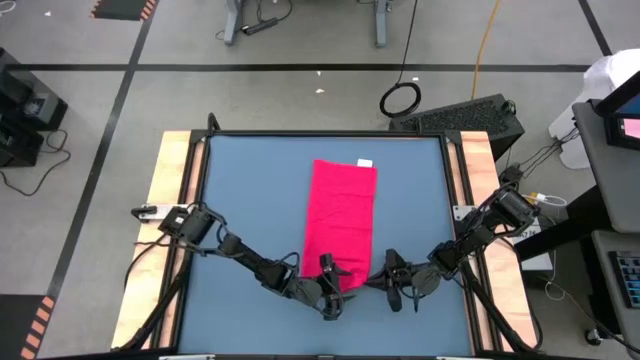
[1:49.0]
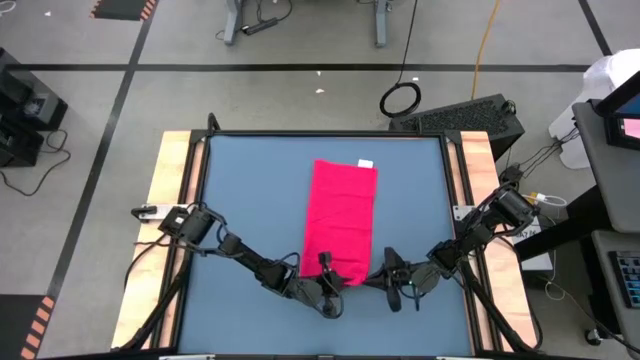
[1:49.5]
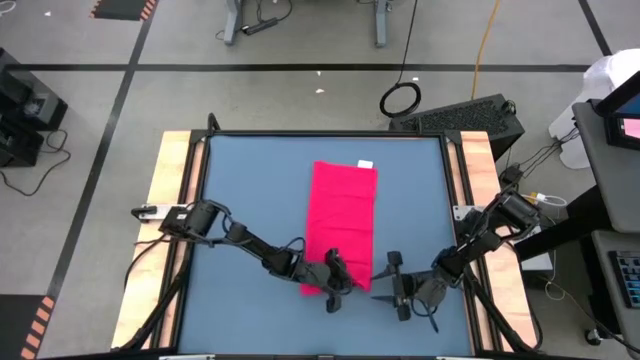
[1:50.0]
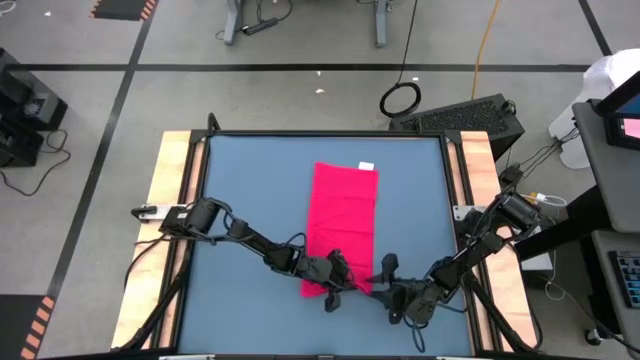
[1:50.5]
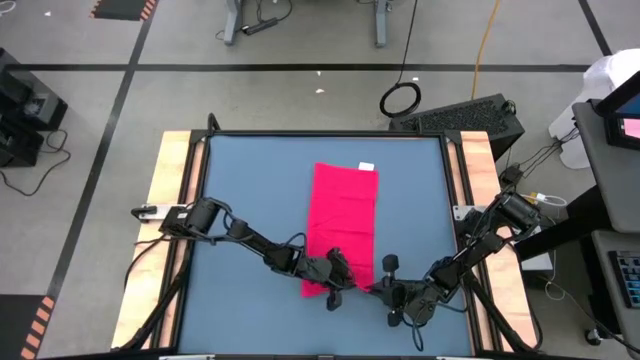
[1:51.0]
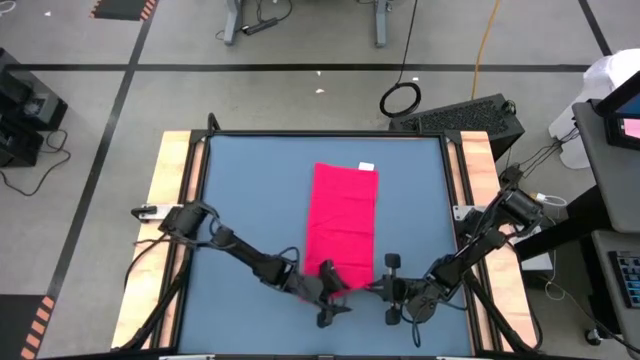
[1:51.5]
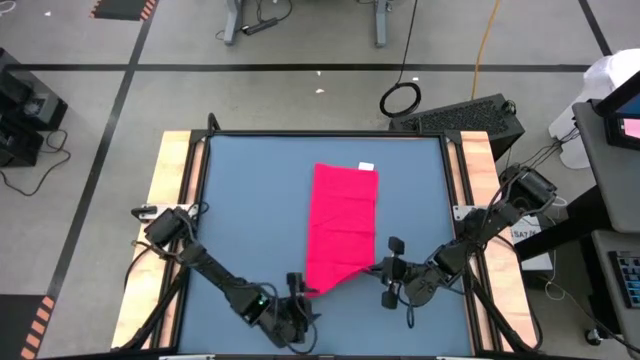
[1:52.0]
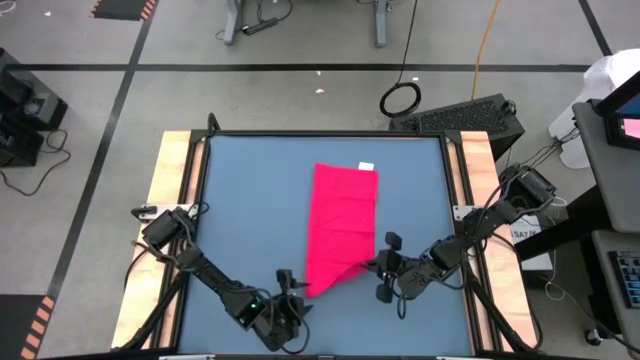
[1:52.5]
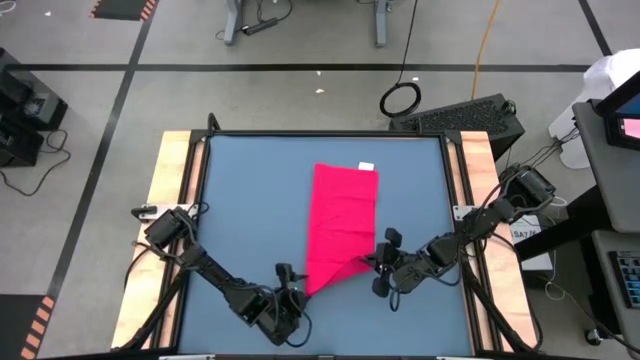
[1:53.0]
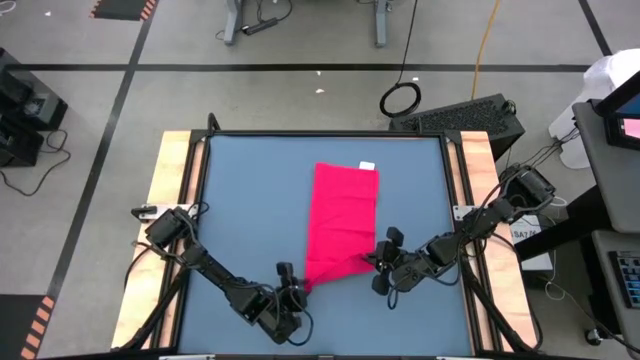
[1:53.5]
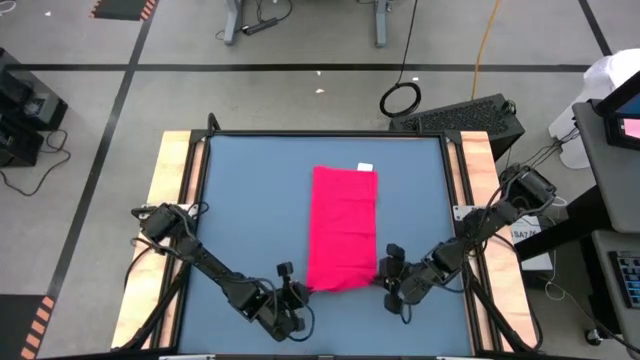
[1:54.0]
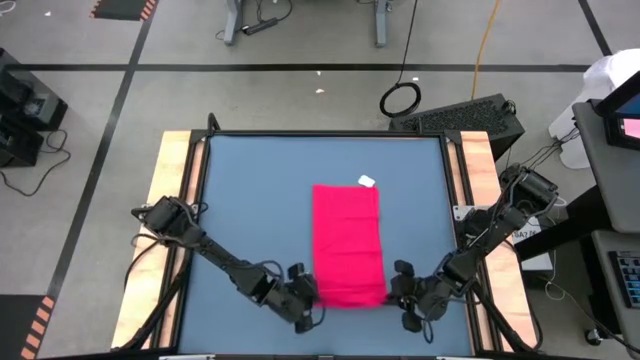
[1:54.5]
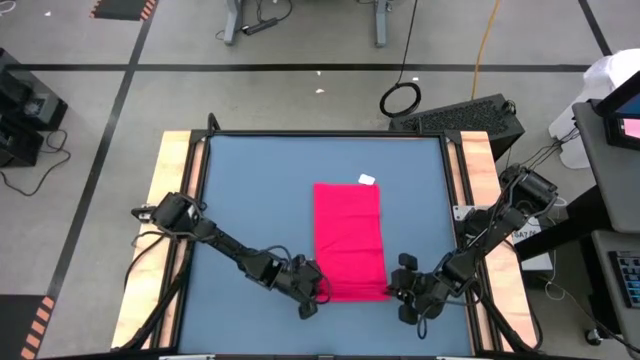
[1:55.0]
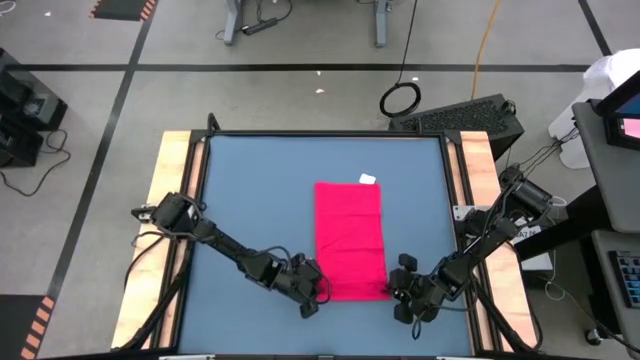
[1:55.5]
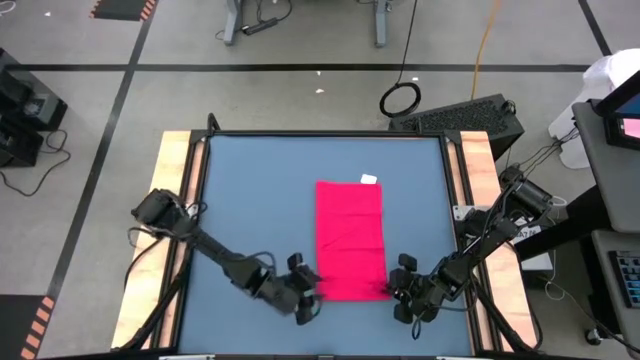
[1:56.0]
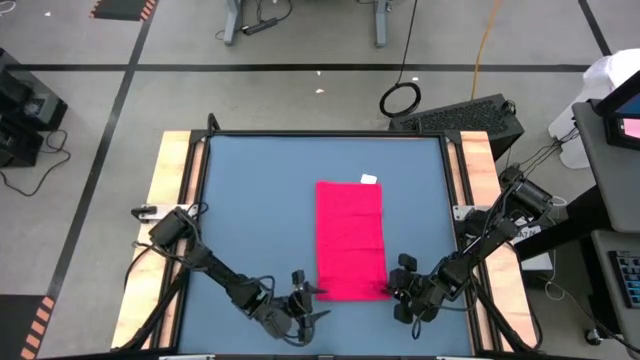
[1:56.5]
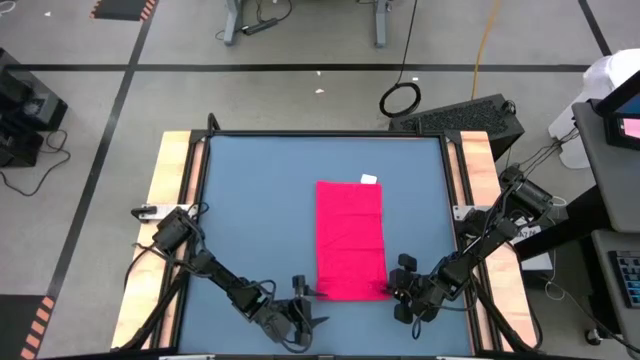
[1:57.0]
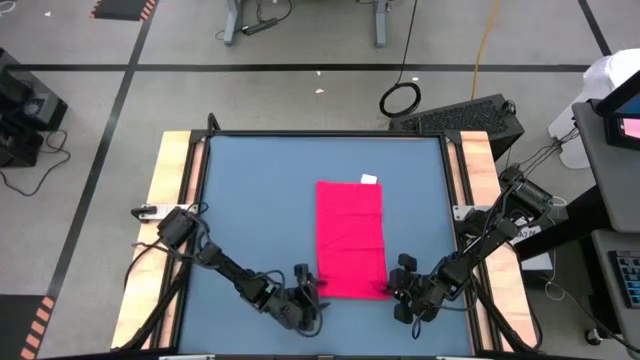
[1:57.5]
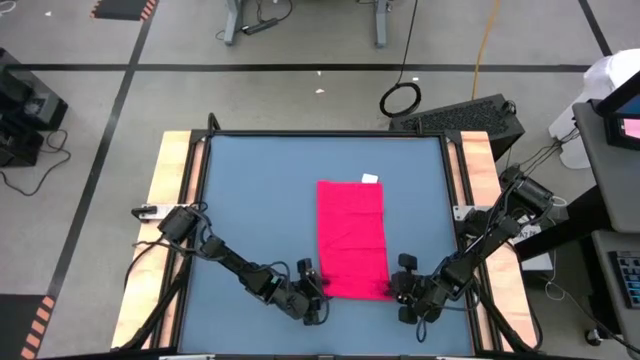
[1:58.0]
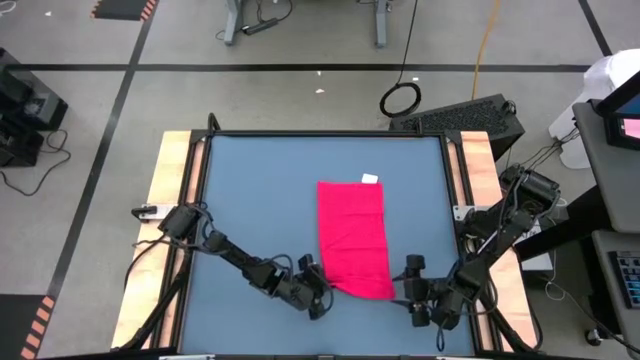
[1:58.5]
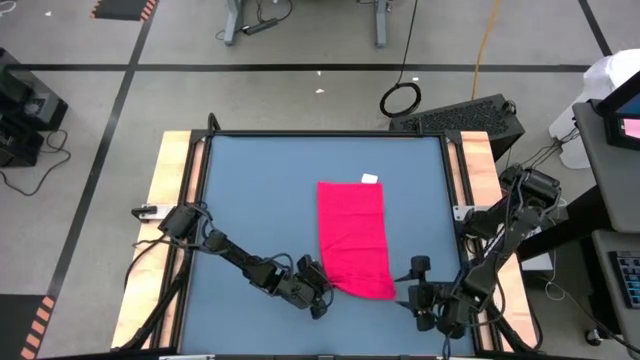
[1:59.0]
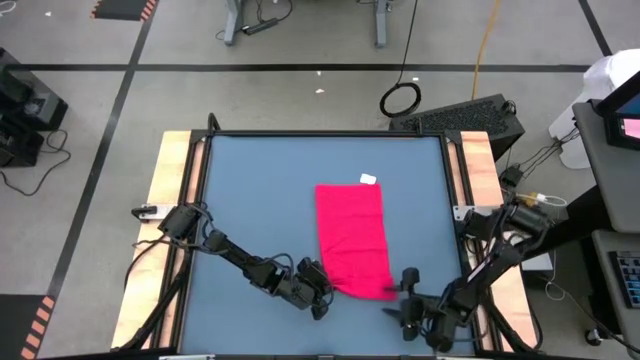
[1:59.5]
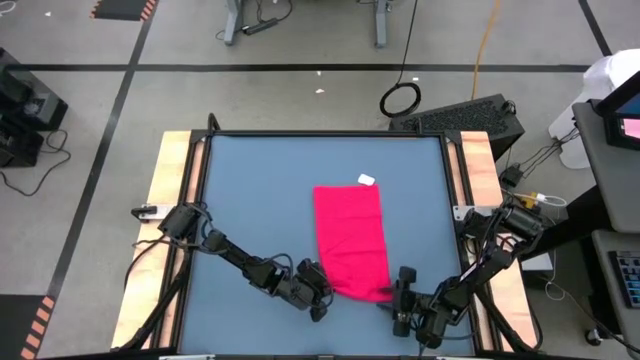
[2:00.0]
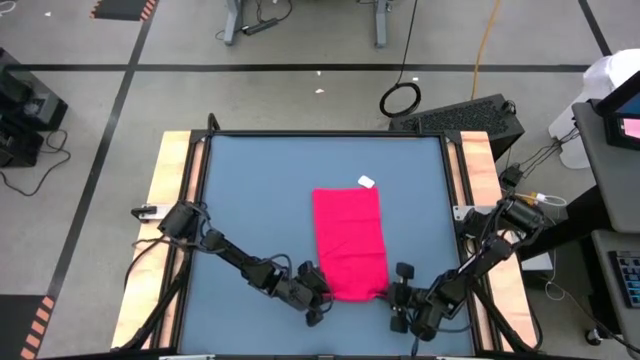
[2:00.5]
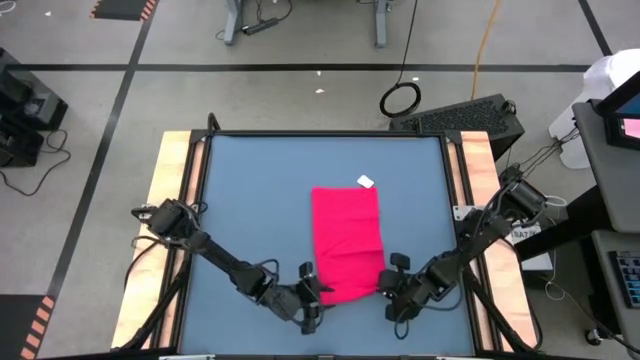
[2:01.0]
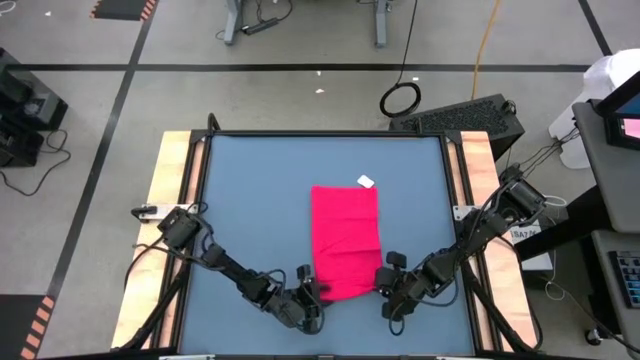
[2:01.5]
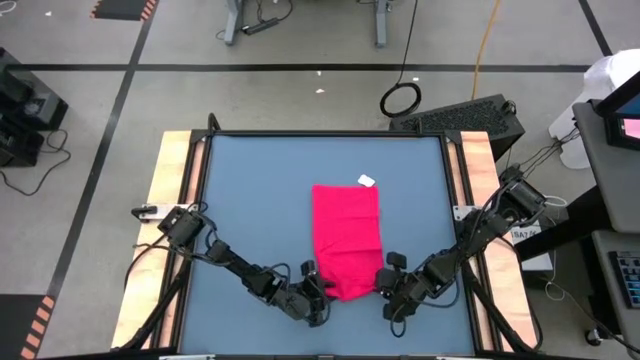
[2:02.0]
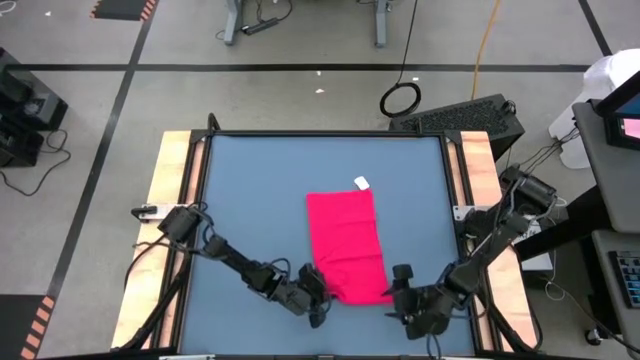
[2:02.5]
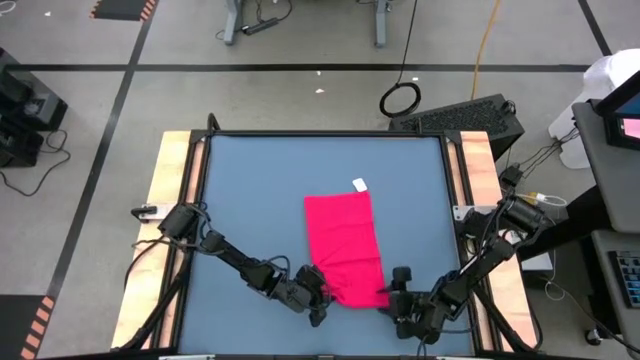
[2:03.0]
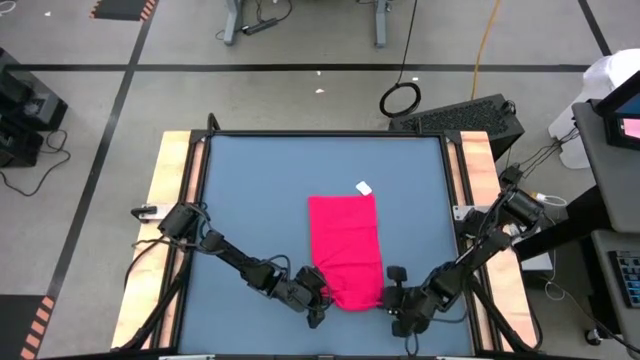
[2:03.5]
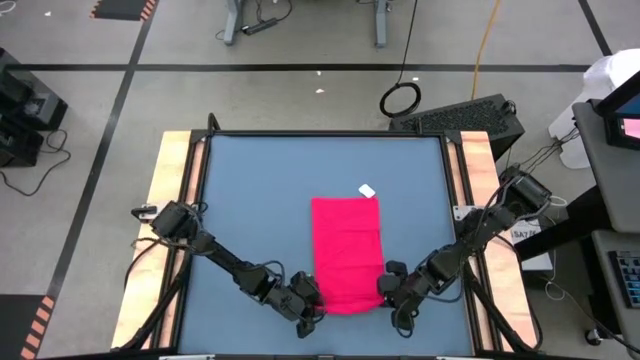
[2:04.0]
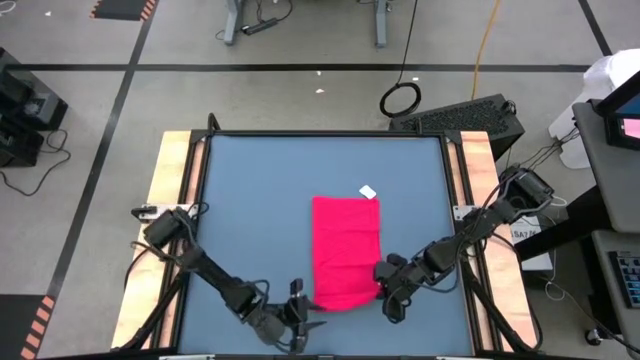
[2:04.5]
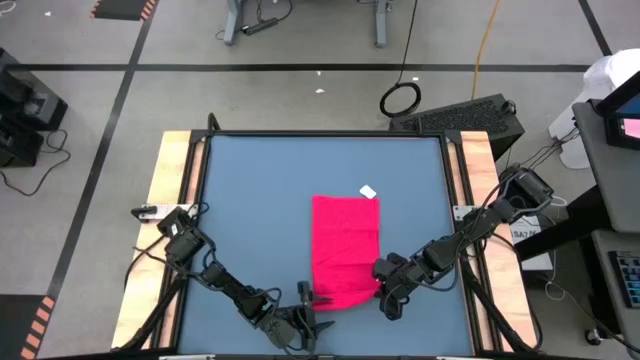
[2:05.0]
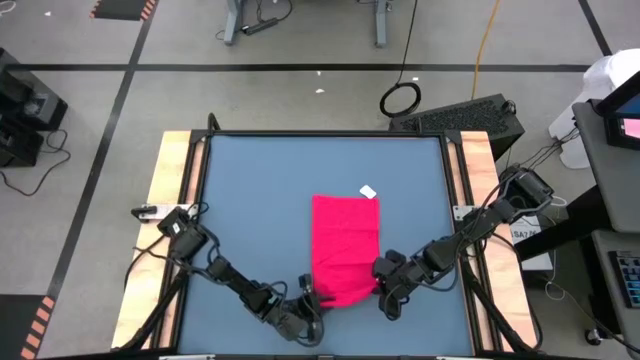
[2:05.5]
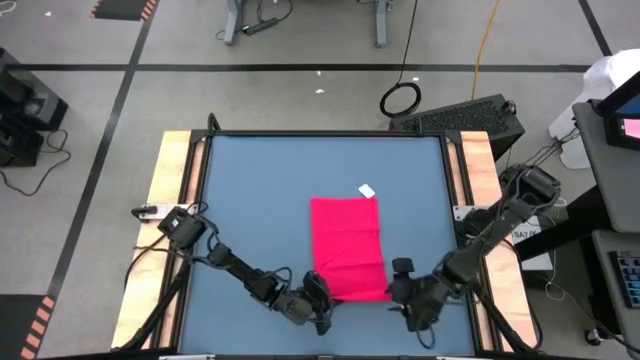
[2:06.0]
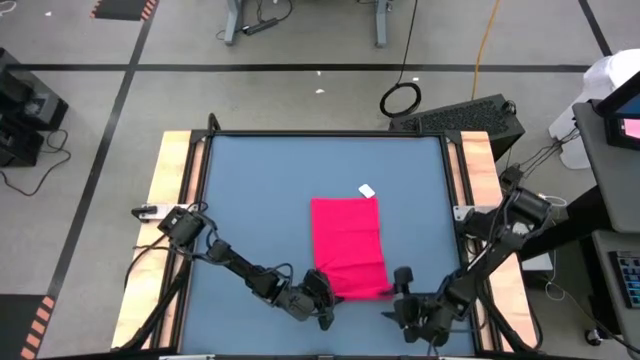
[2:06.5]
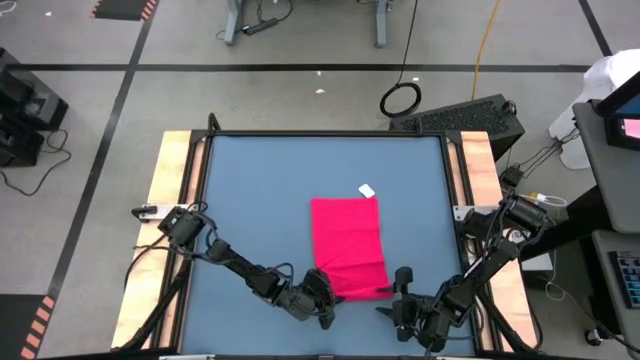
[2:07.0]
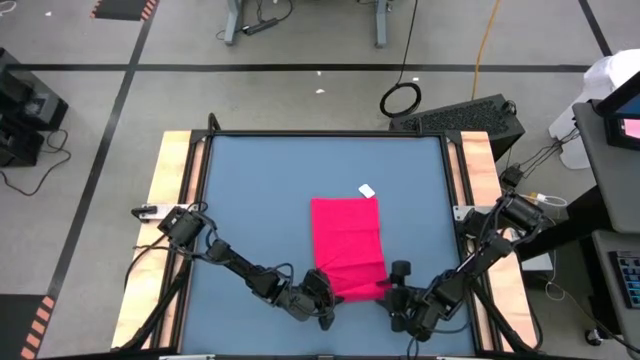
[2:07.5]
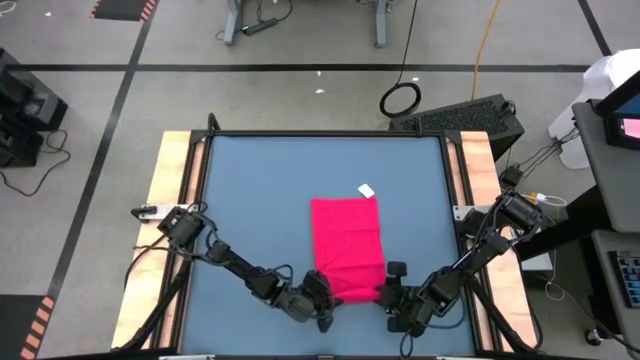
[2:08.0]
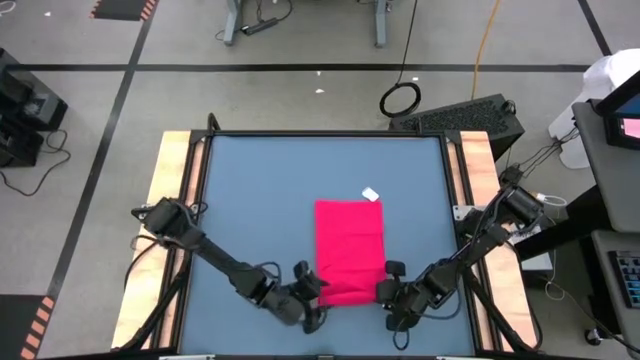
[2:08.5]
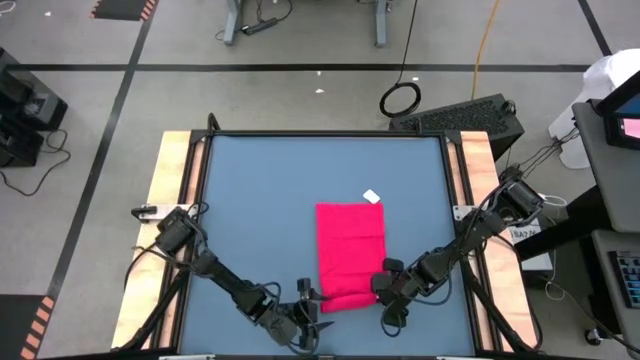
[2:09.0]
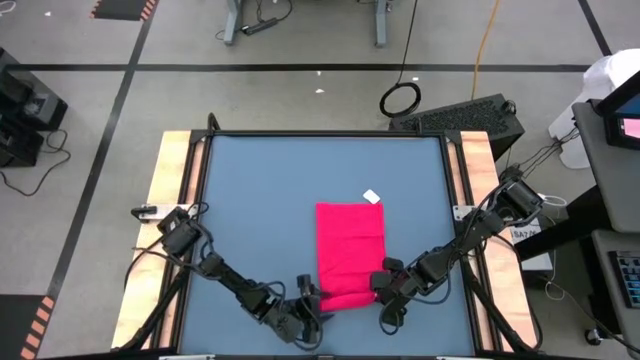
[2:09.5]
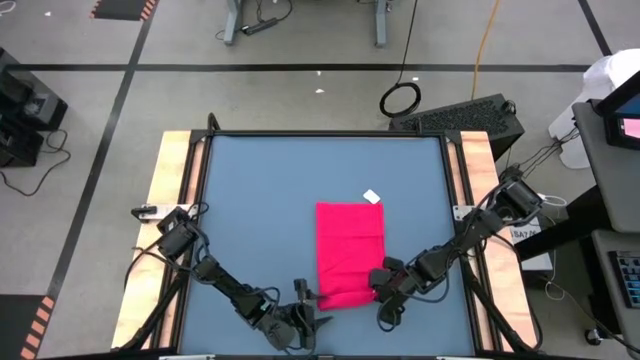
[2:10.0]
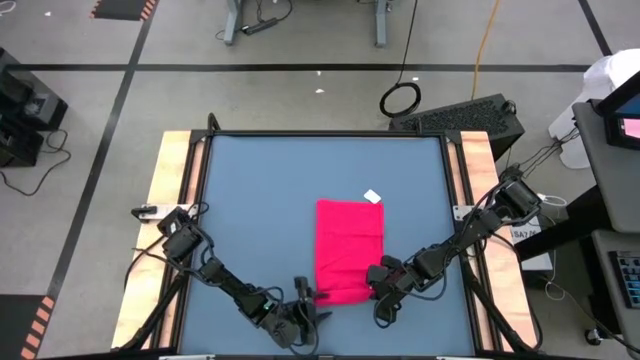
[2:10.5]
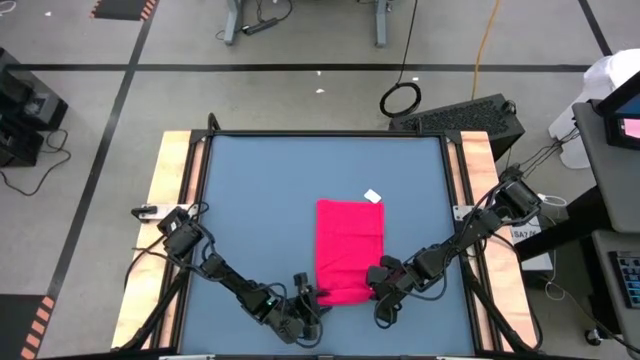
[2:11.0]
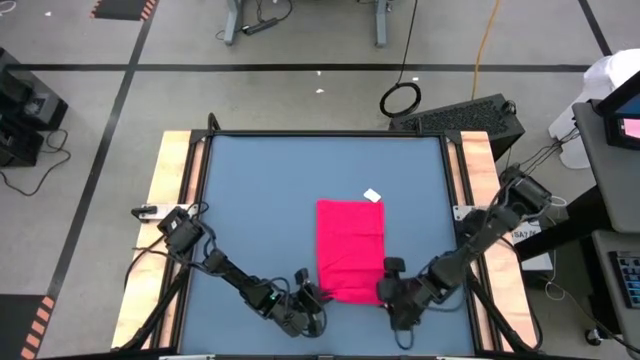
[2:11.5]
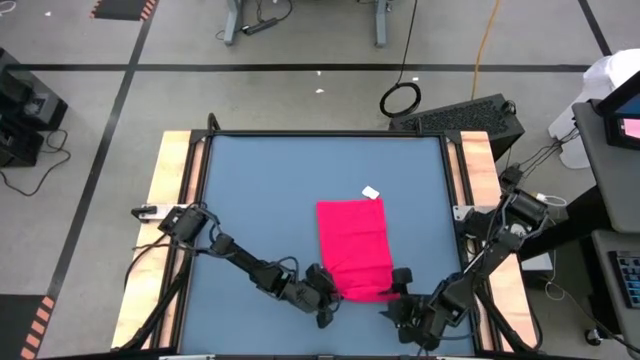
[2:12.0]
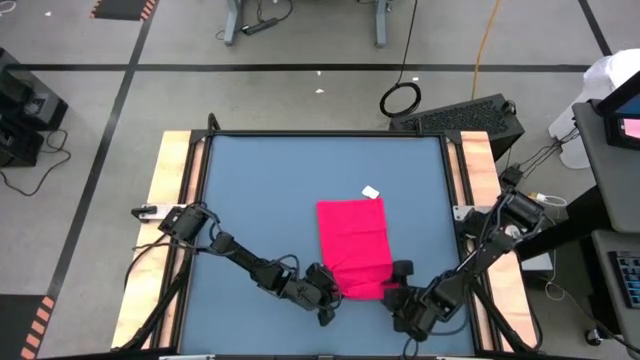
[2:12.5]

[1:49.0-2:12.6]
Task: Roll towel
Roll the red towel
